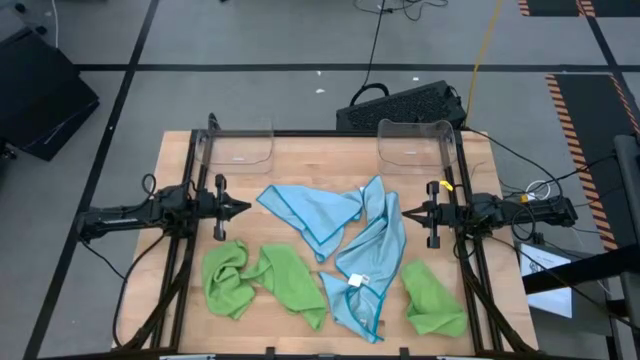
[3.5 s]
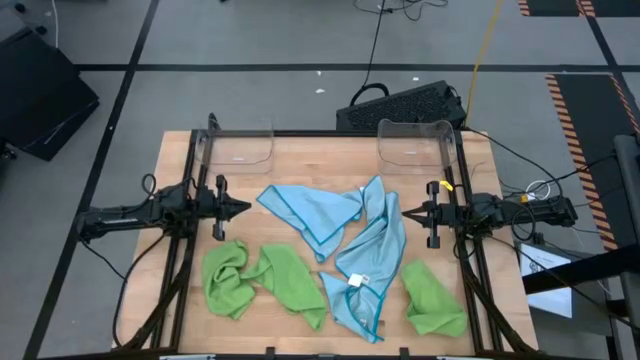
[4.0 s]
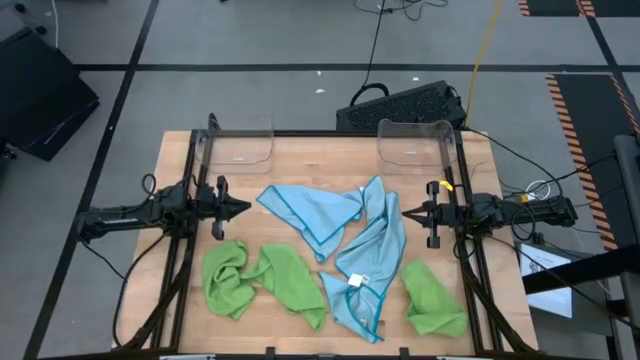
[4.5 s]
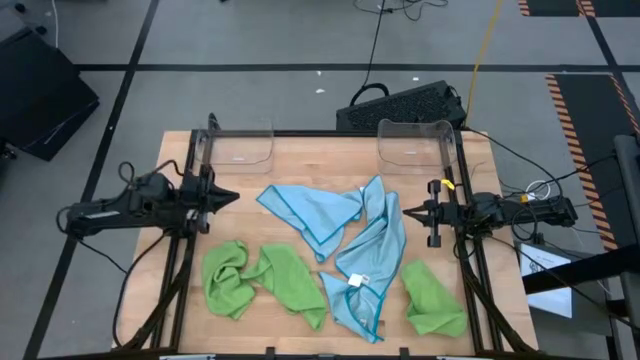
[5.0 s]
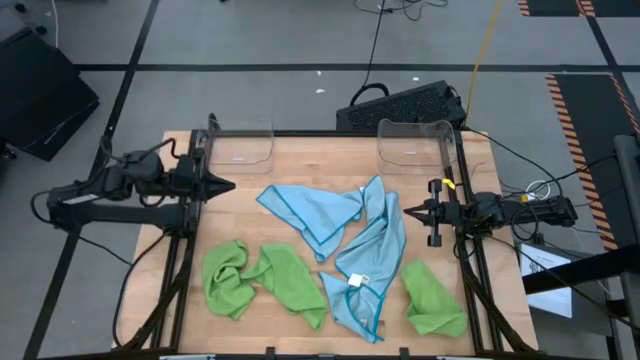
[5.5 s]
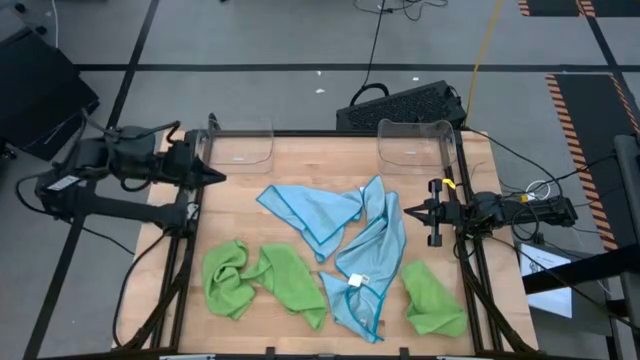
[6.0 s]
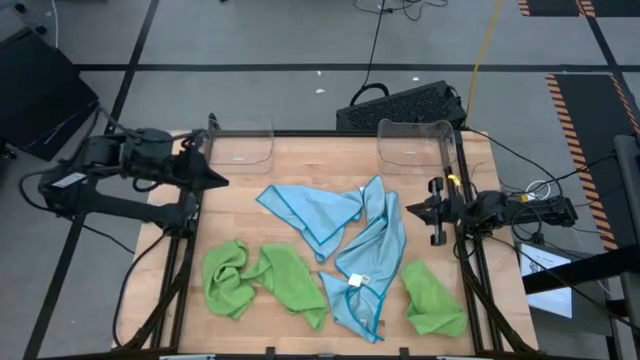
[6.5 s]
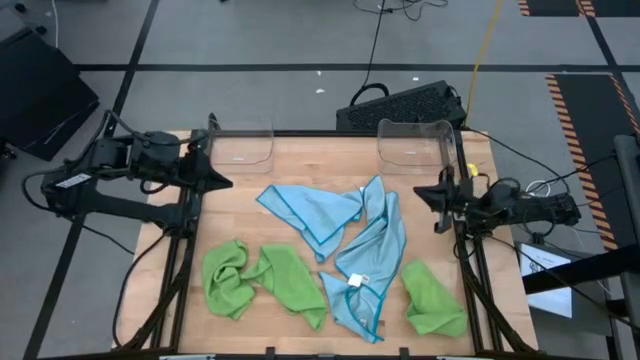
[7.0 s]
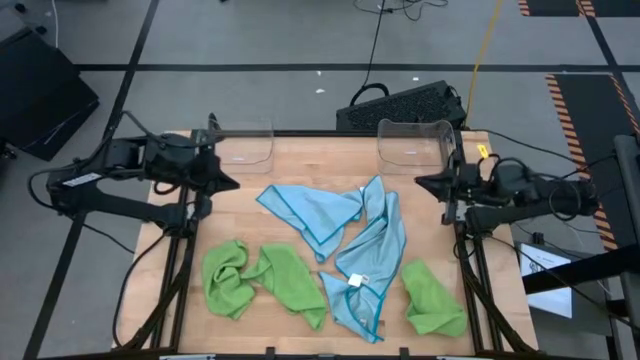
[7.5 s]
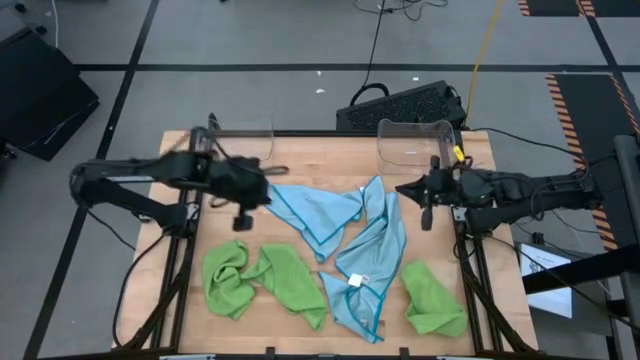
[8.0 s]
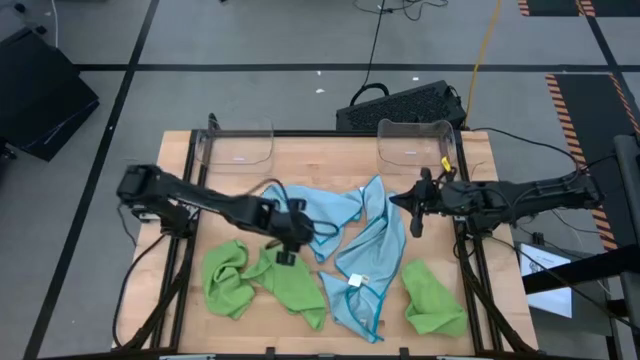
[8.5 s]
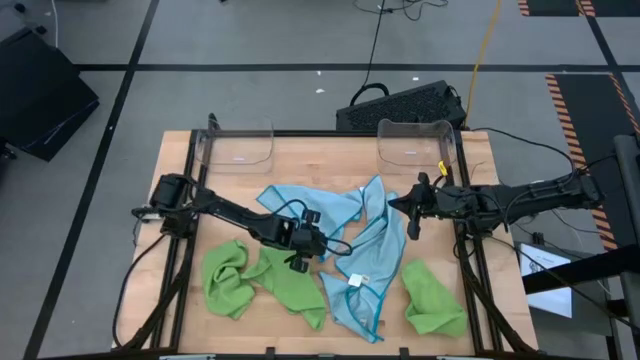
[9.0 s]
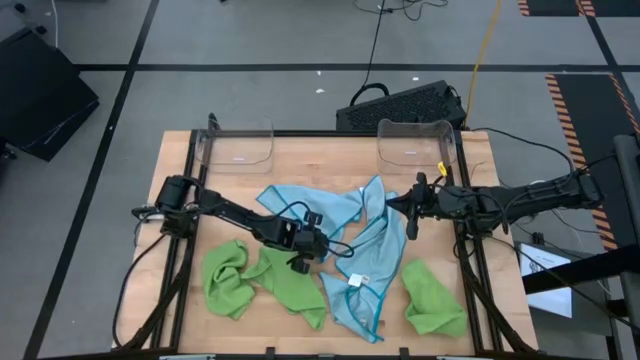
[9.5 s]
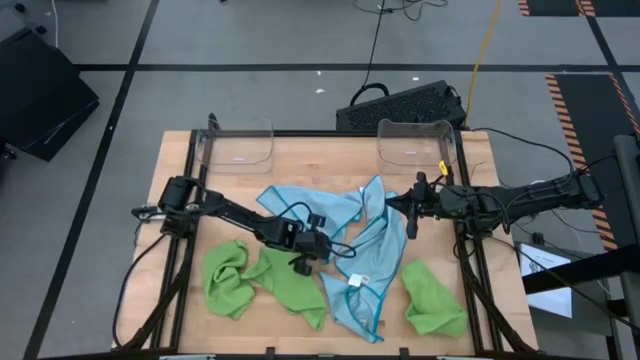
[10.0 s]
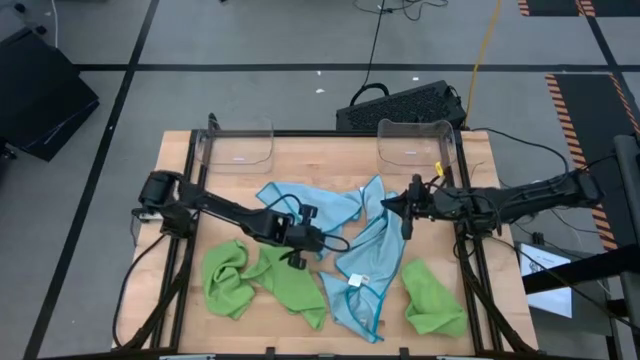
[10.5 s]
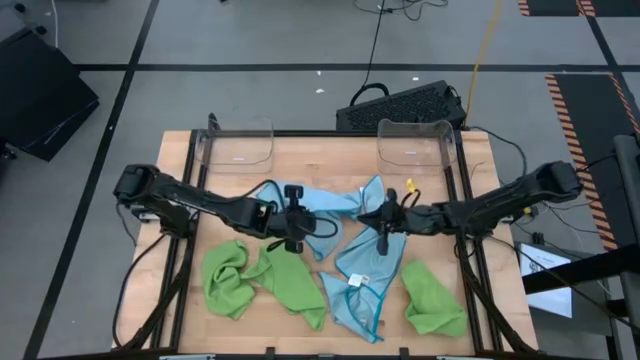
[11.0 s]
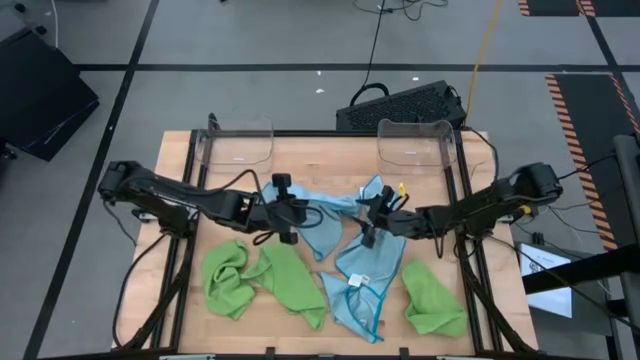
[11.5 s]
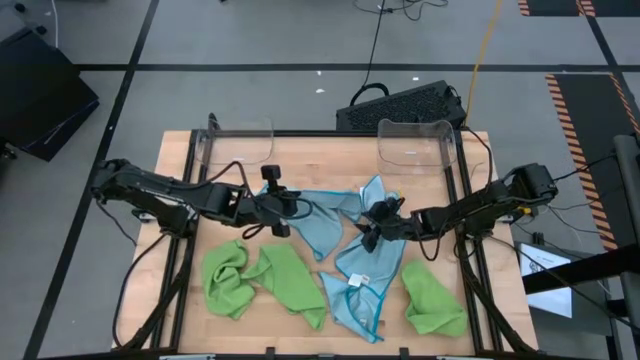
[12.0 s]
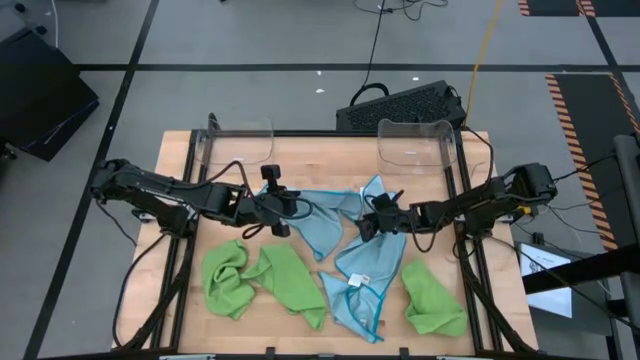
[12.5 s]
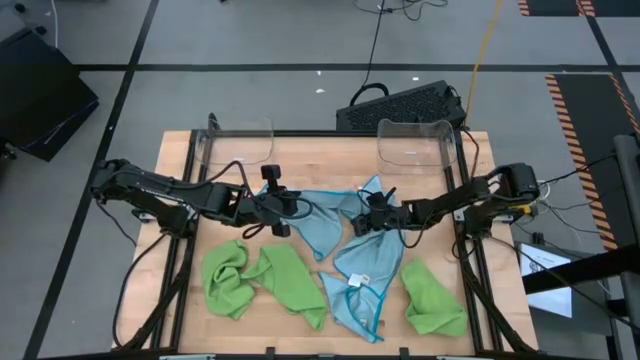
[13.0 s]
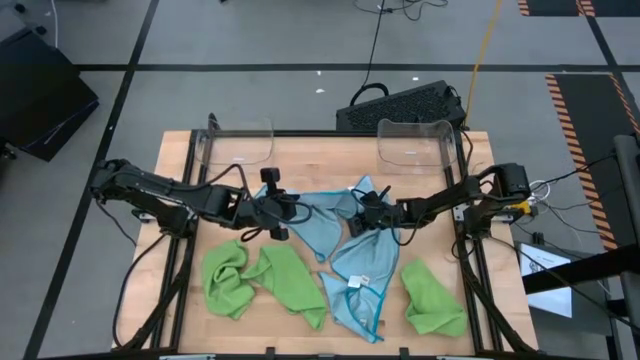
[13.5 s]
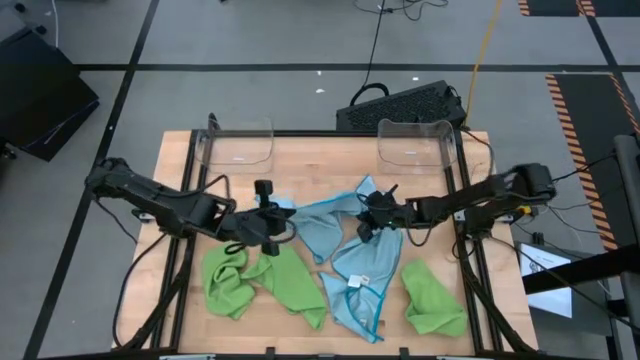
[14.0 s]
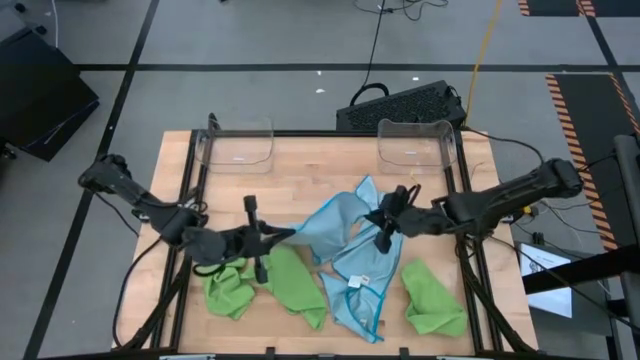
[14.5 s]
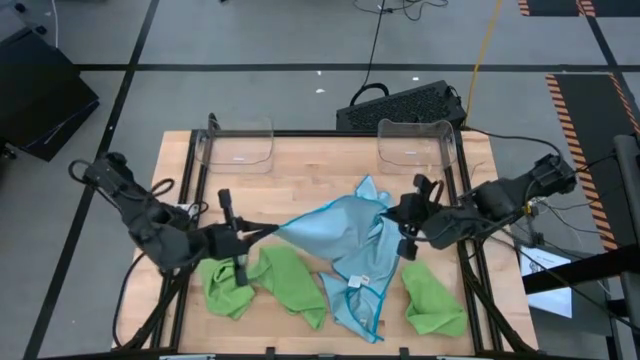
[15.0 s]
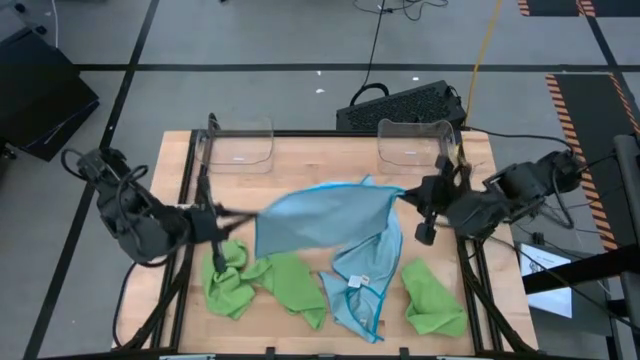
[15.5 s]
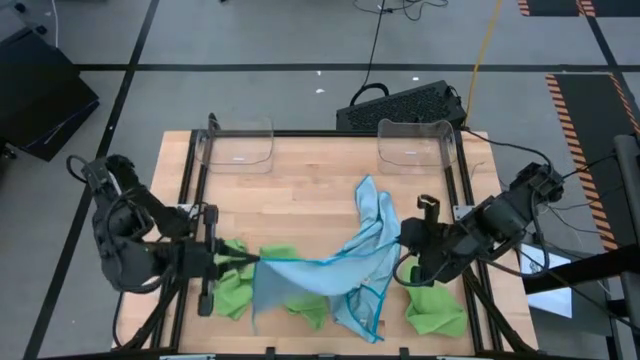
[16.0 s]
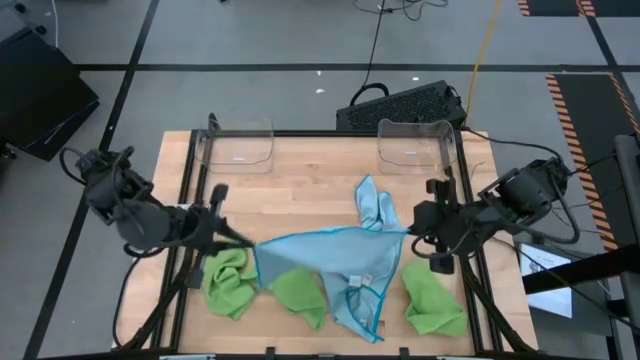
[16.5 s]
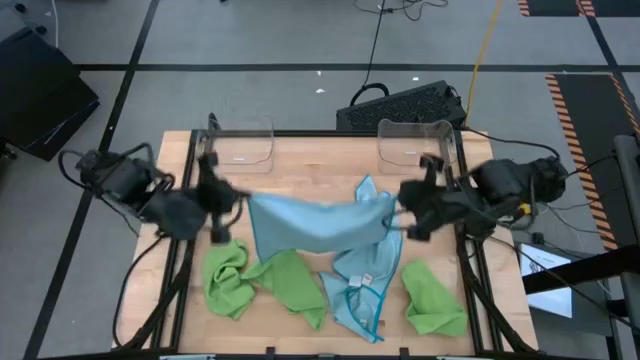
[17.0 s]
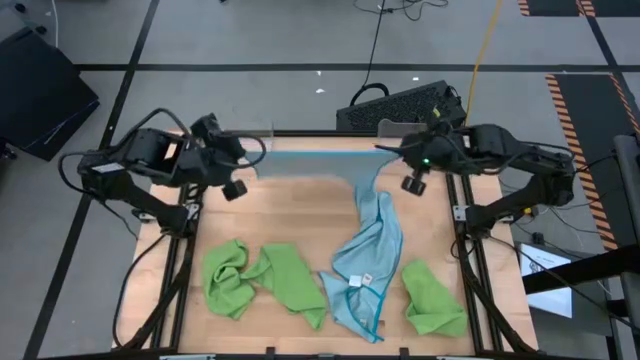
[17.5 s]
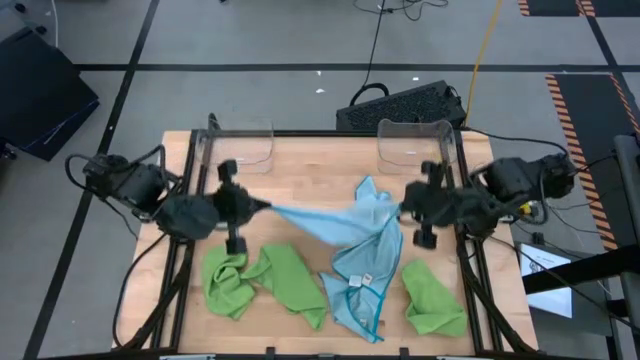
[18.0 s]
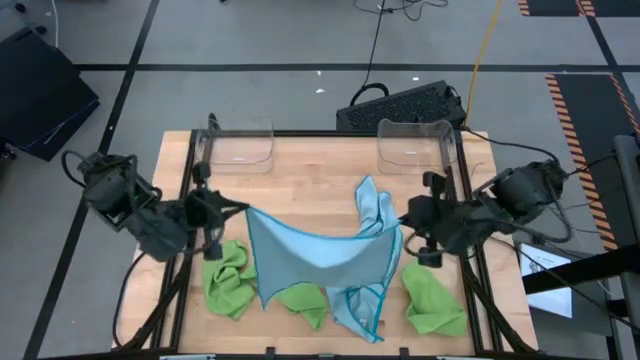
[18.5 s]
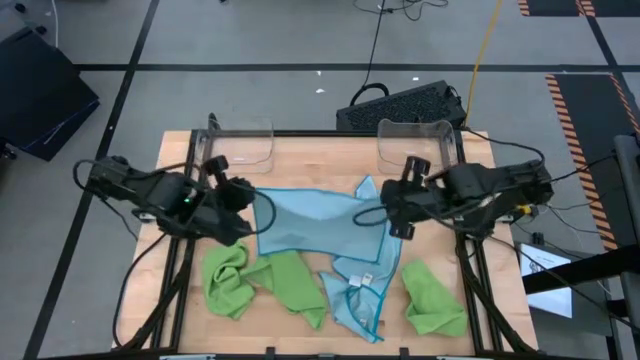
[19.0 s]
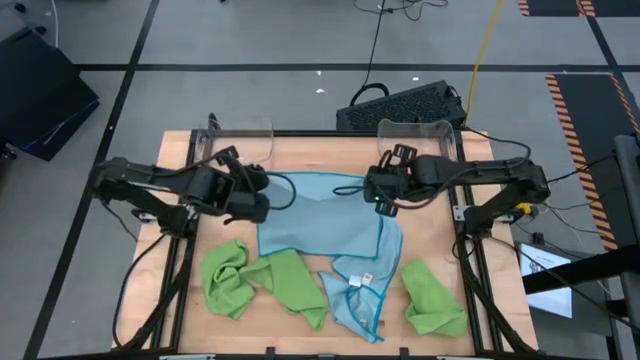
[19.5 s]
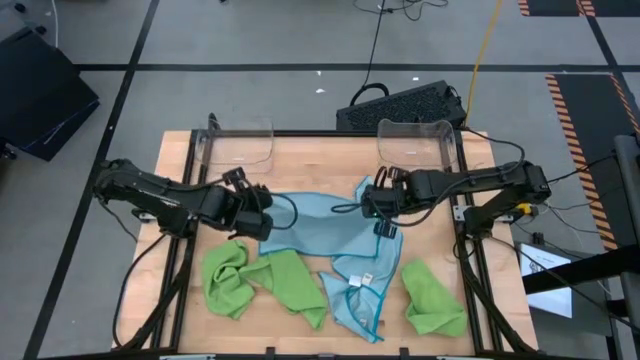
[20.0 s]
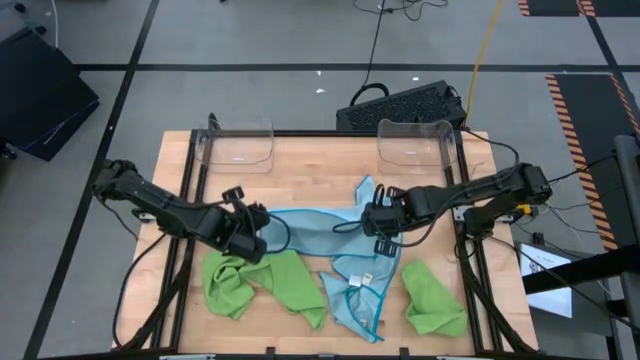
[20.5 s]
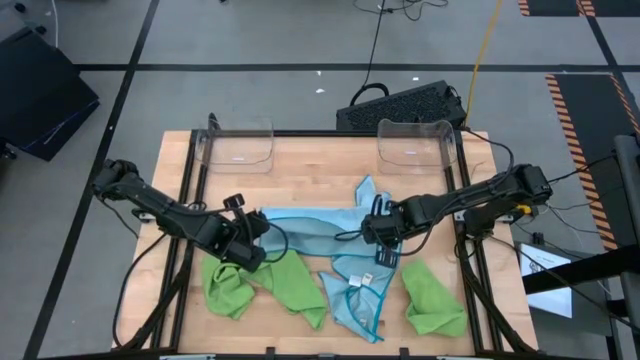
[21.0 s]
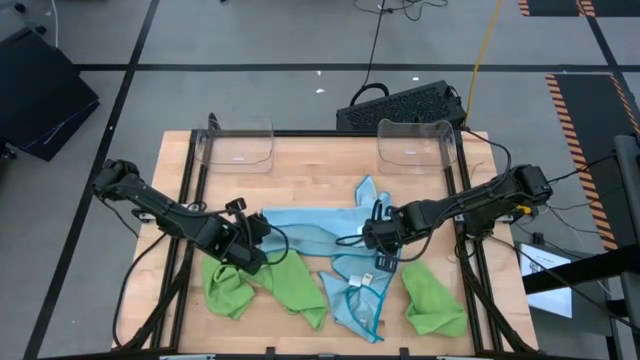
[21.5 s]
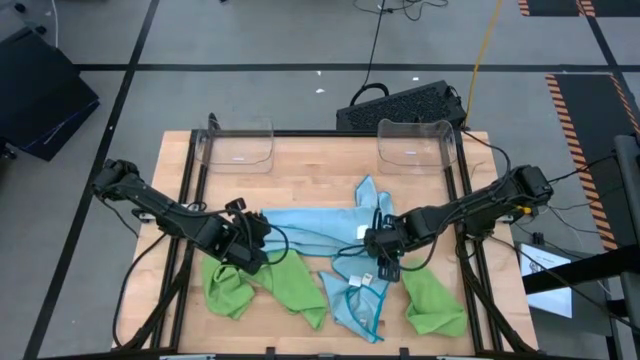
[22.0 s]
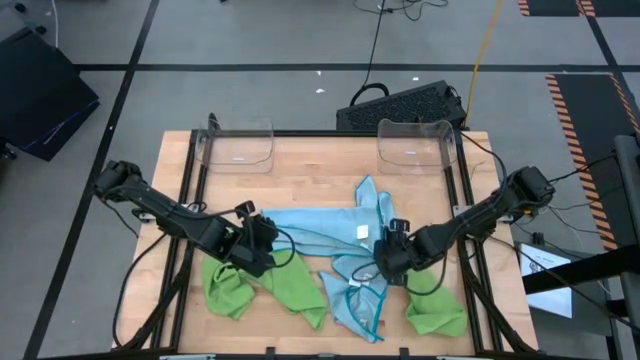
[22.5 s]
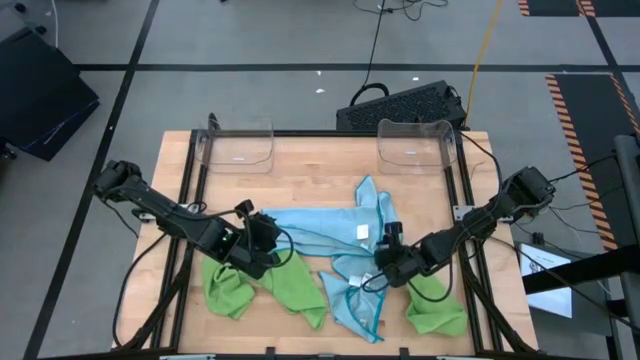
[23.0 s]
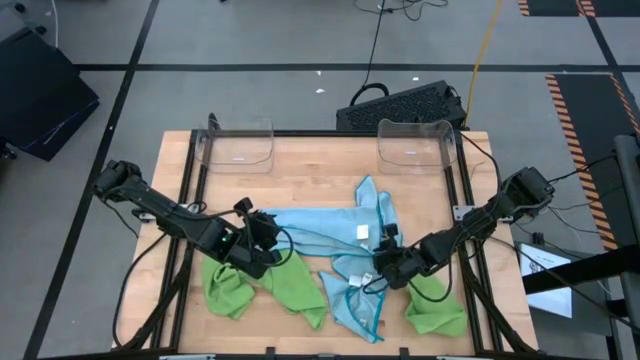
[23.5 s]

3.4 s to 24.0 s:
Task: Fold microfiber towels
Fold the top left blue microfiber cloth
